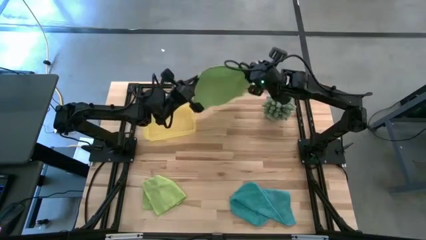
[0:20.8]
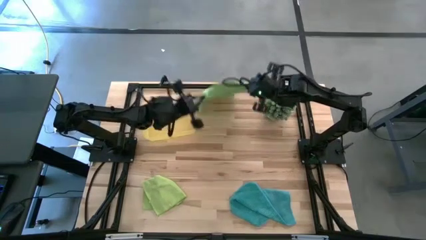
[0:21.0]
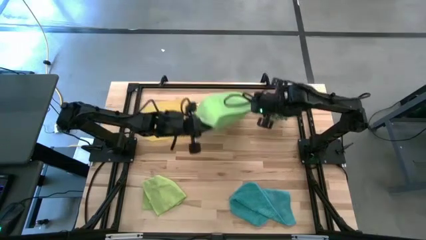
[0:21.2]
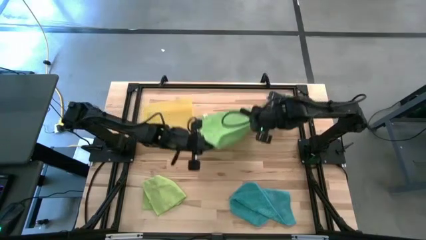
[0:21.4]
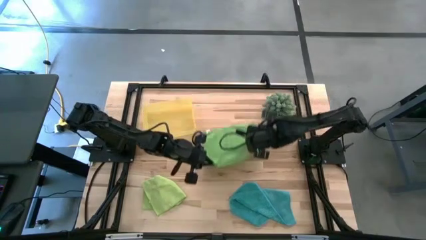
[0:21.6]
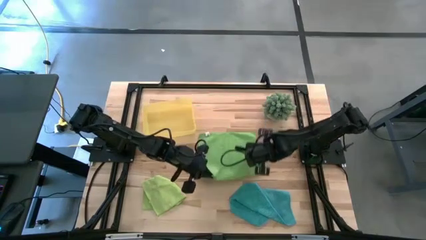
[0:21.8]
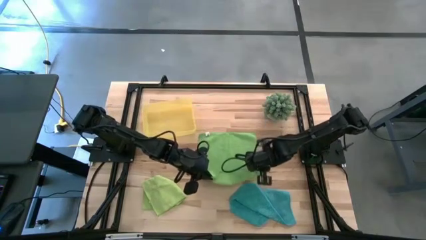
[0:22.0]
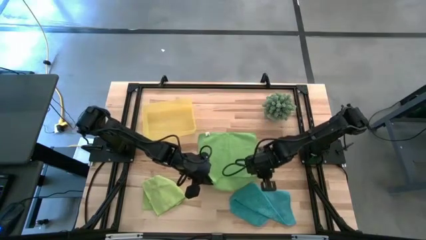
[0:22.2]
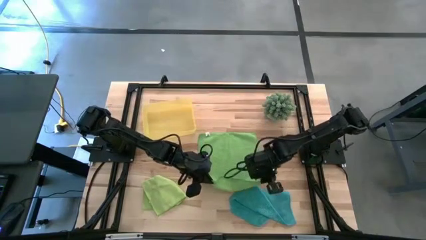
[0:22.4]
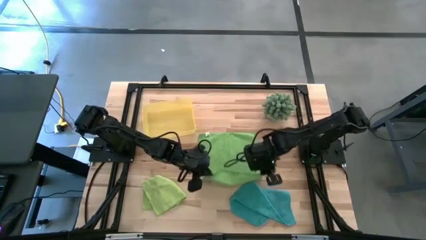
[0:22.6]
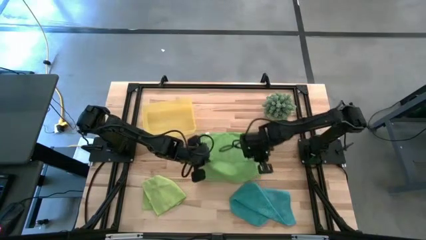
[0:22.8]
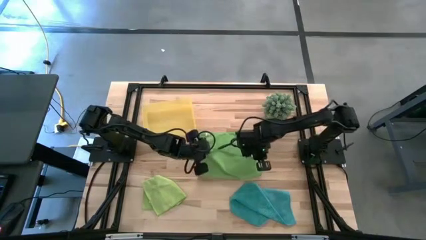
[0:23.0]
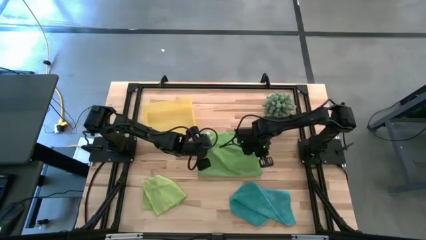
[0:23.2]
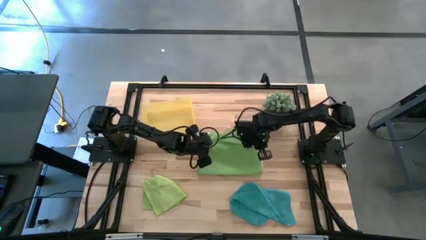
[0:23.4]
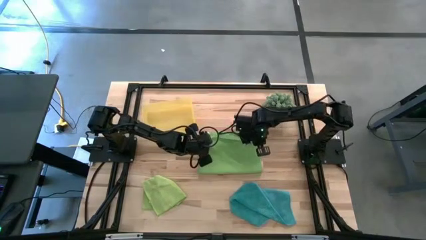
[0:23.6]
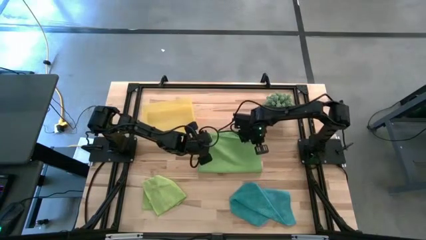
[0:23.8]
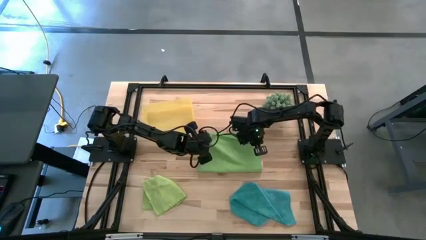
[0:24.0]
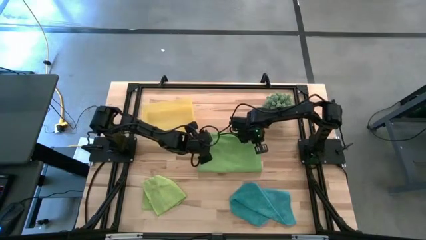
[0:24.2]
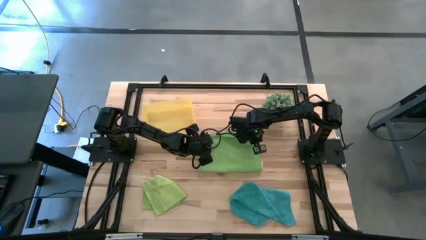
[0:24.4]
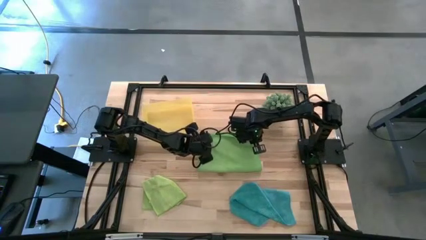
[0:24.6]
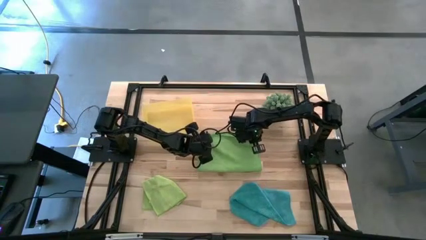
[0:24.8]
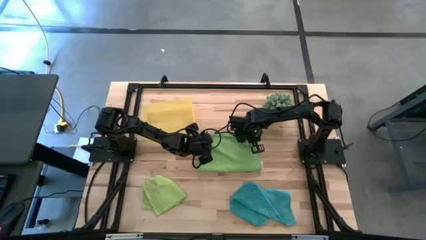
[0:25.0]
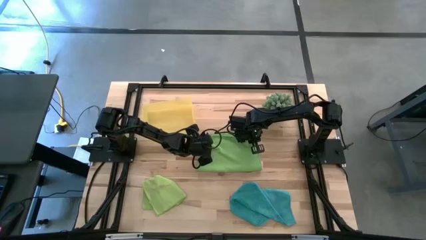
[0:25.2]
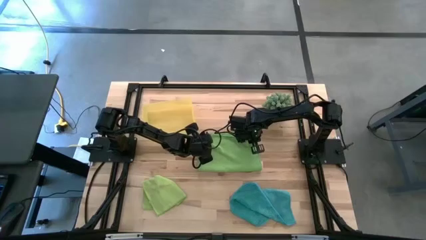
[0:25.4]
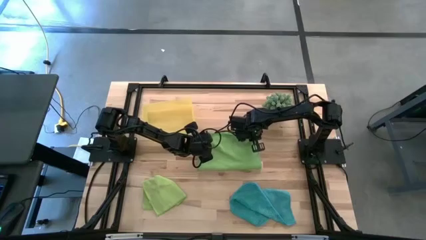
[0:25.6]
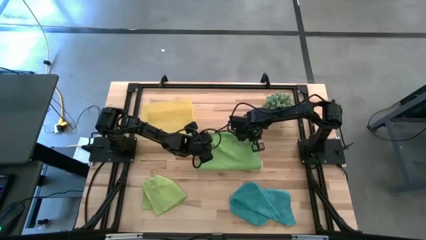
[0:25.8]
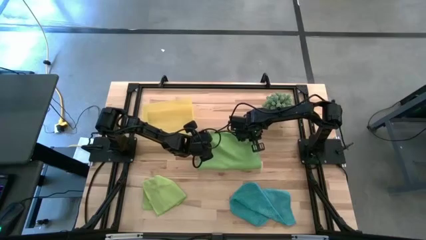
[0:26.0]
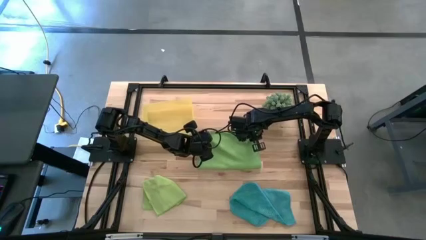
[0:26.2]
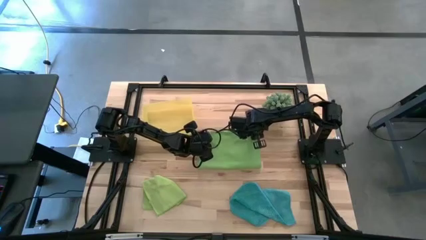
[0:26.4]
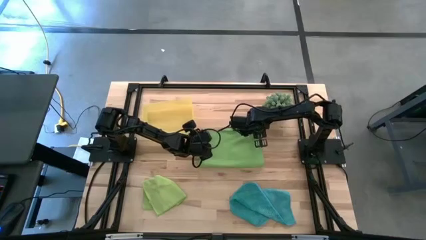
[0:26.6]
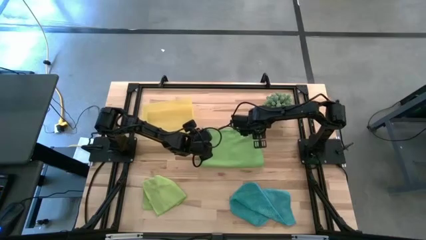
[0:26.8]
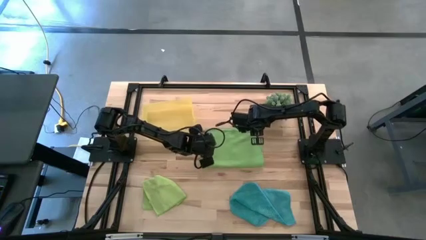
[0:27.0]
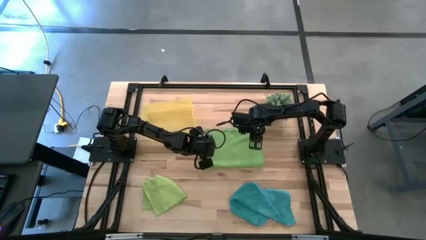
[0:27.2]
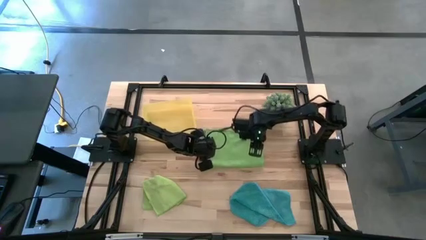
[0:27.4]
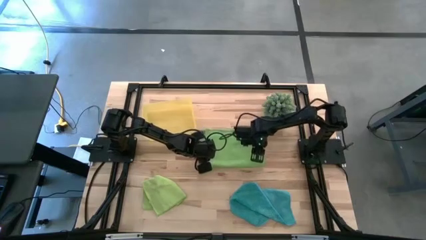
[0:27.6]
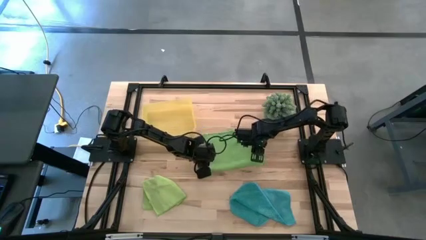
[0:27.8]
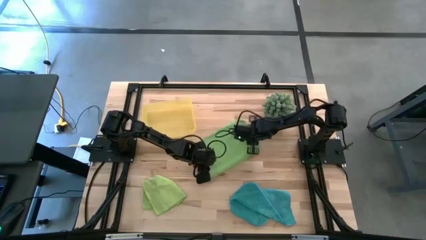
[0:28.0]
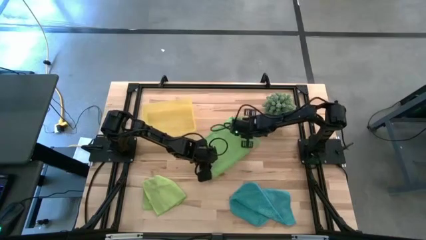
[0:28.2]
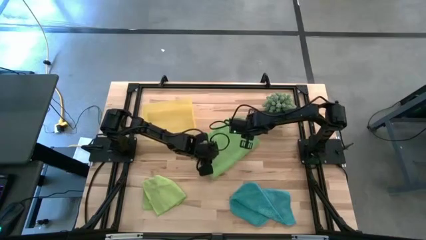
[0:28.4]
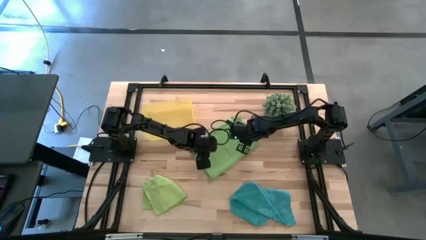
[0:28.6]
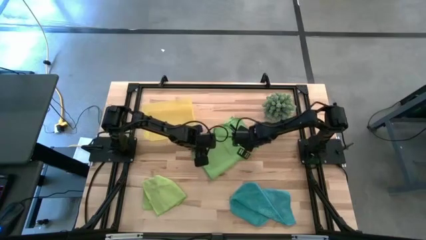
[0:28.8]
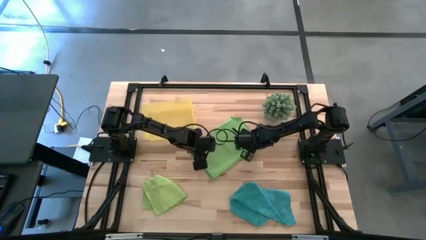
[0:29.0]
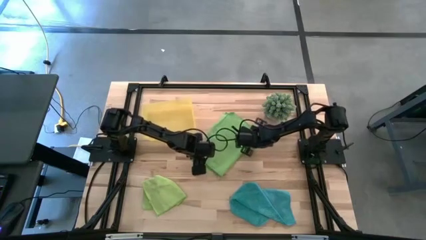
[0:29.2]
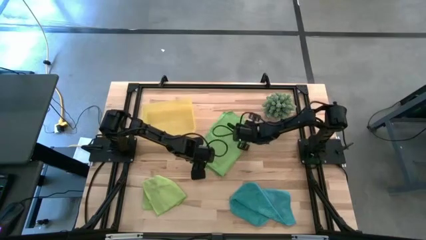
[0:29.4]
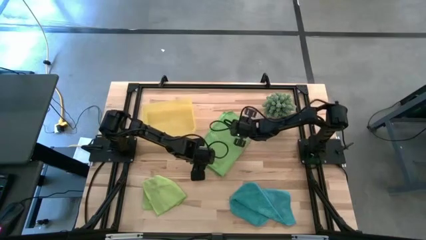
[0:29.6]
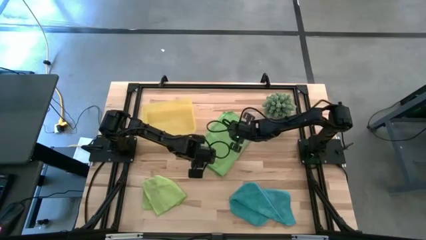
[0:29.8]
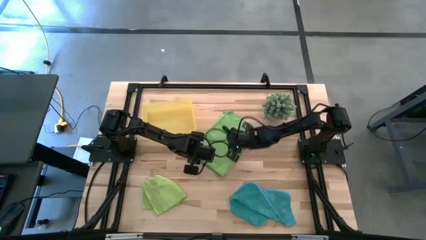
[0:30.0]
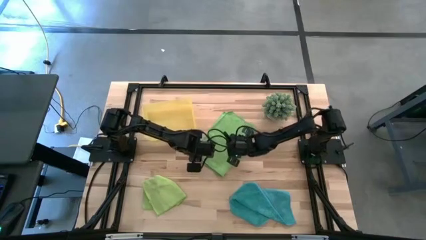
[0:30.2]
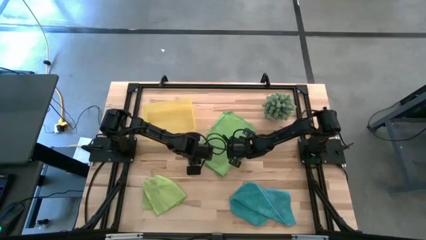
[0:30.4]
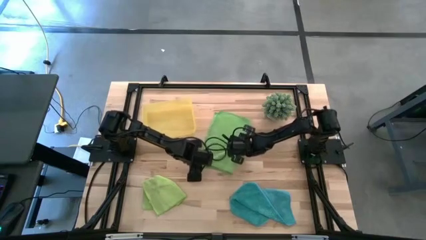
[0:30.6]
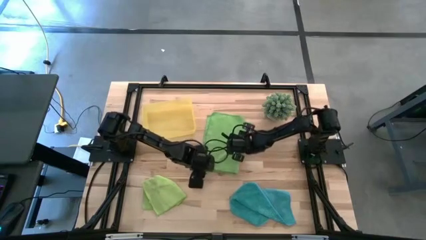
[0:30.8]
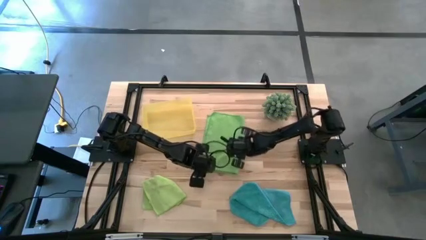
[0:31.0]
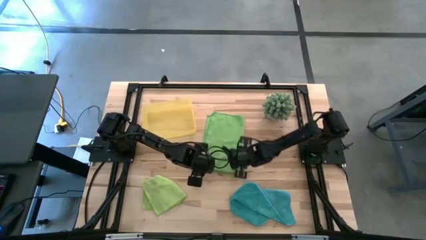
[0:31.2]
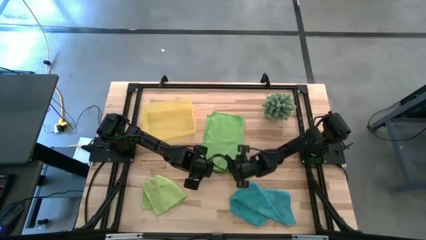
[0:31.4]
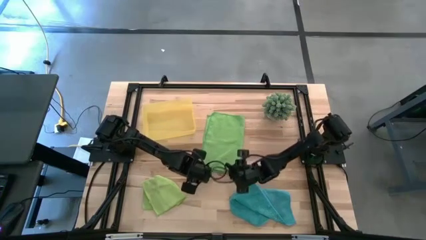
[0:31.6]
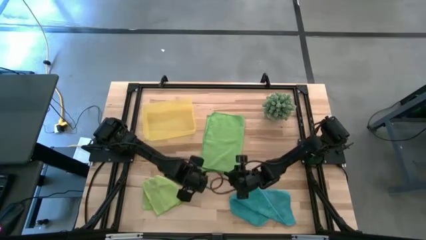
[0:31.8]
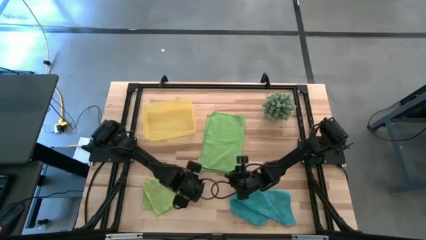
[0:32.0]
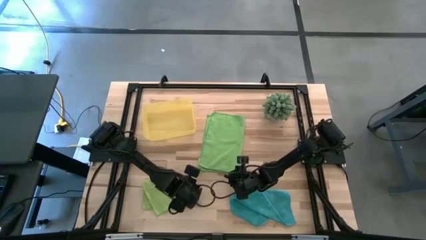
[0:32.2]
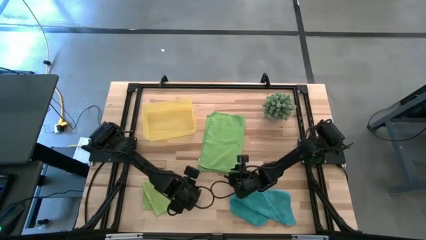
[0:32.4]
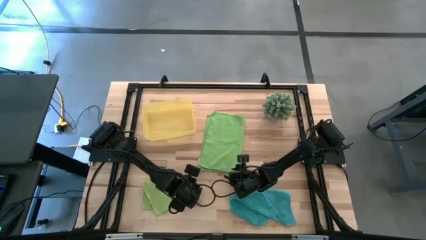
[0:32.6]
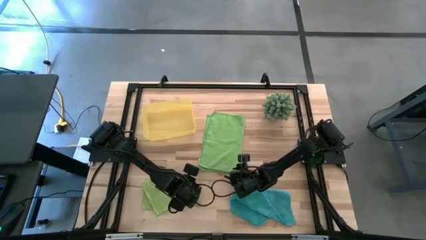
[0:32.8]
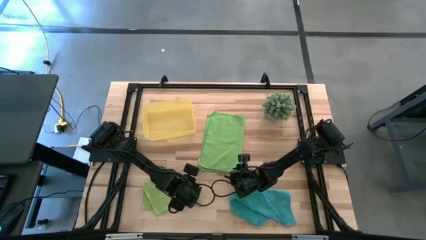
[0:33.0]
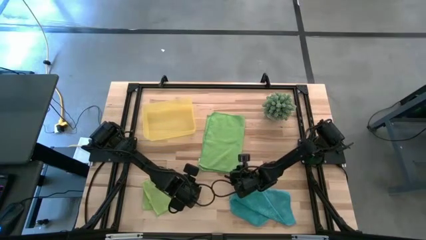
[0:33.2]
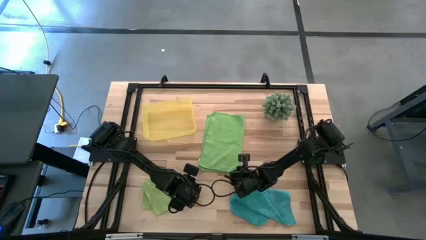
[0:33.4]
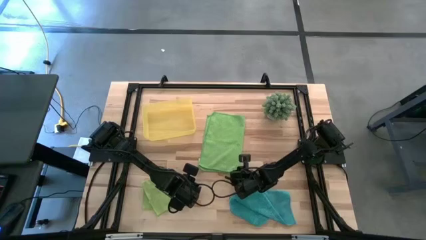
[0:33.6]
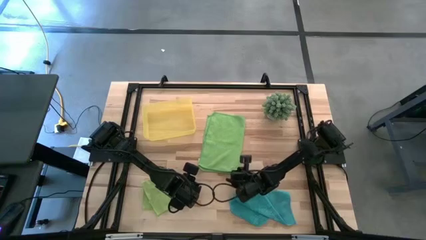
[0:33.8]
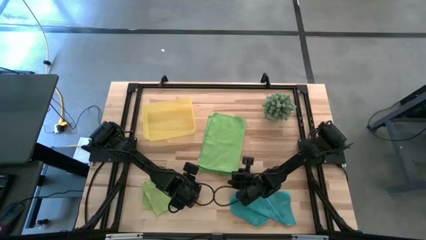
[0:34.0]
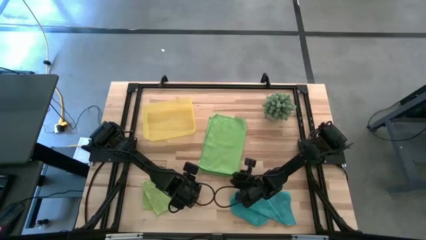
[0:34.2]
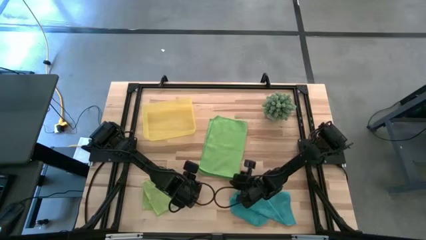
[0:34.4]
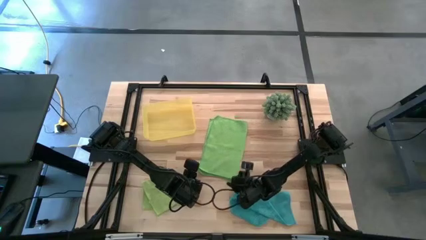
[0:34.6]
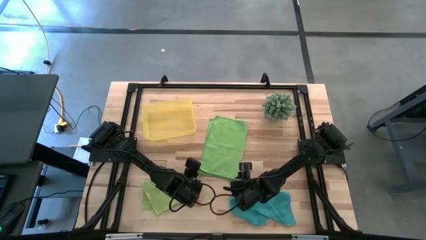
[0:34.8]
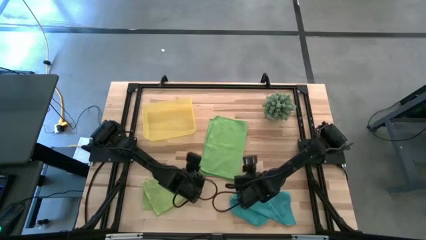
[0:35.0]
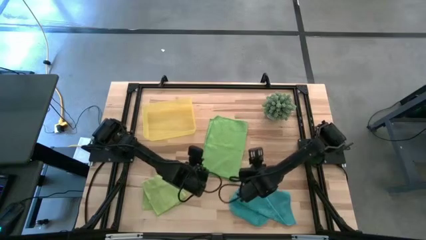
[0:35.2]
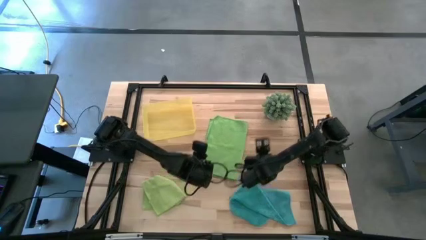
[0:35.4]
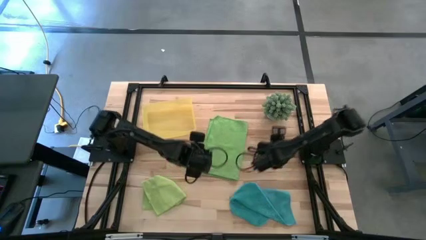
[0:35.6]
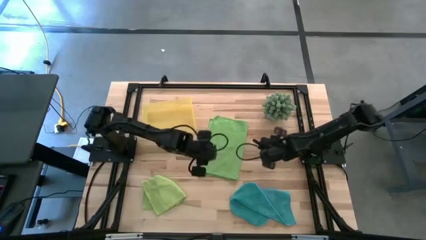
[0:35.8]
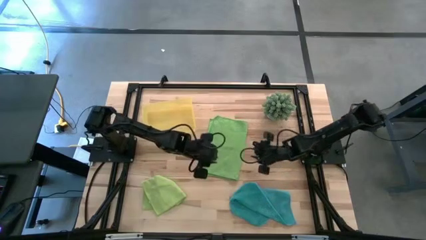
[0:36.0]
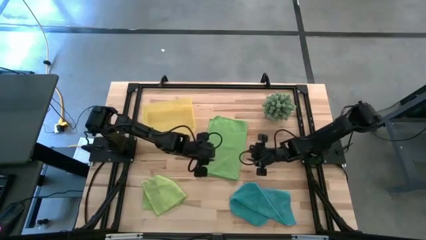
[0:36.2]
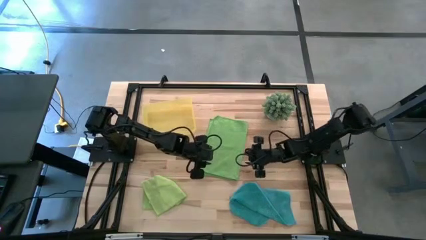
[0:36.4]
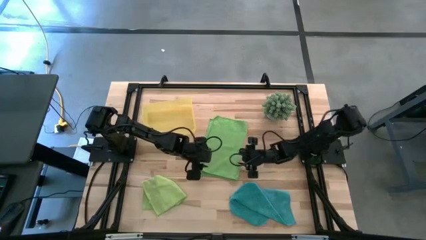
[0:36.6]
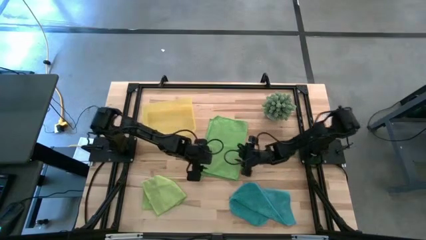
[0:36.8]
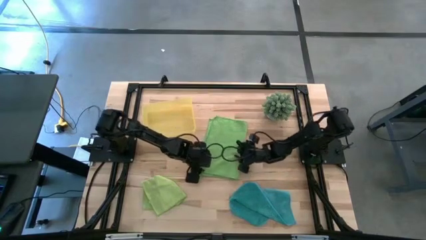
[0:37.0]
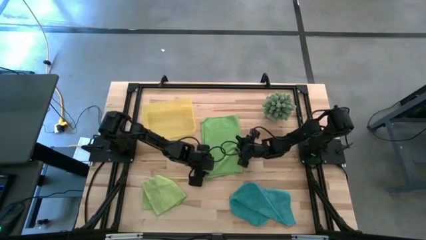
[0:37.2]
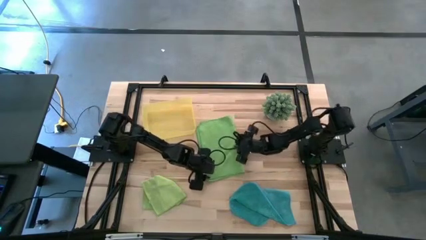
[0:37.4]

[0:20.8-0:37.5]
Task: Roll microfiber towels into tight, uniform cylinder then place into a basket
Fold the green microfiber towel
